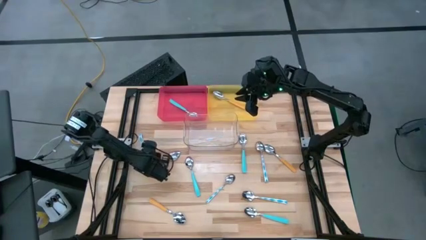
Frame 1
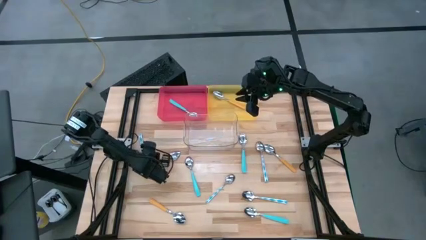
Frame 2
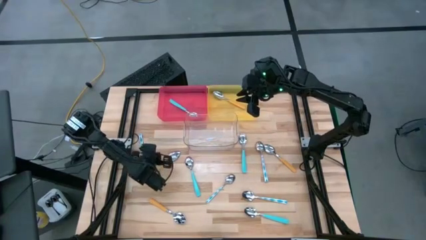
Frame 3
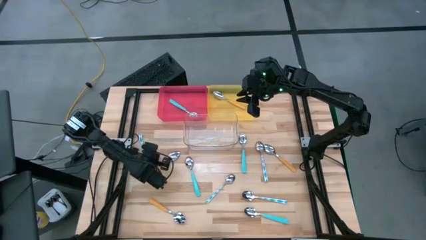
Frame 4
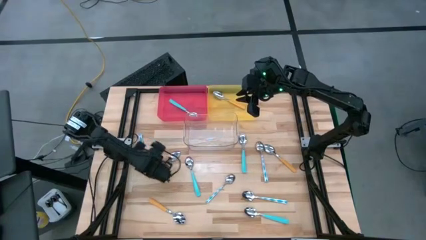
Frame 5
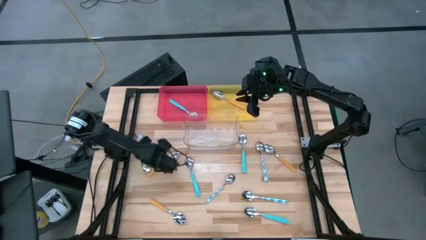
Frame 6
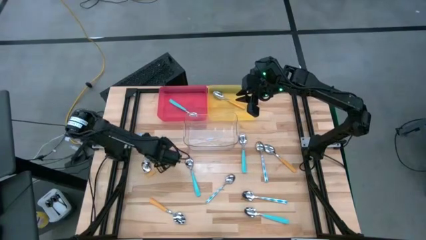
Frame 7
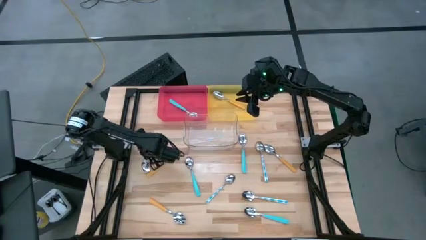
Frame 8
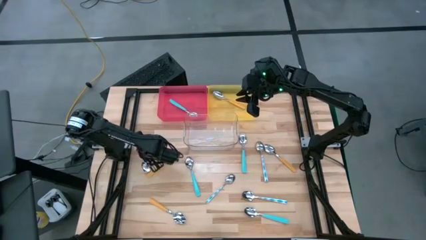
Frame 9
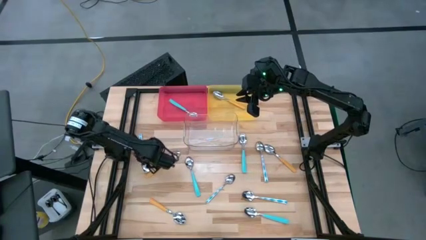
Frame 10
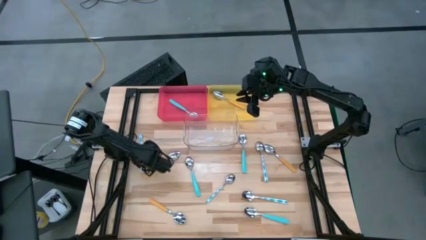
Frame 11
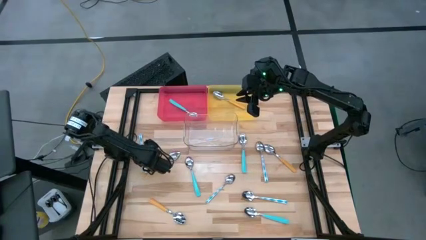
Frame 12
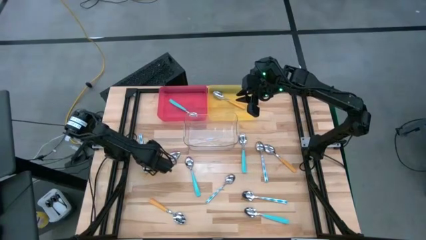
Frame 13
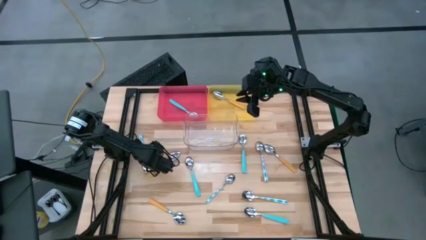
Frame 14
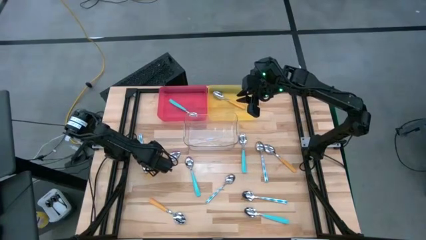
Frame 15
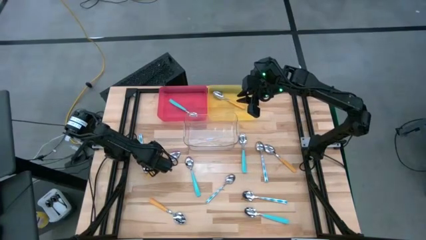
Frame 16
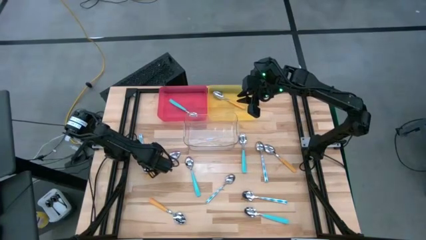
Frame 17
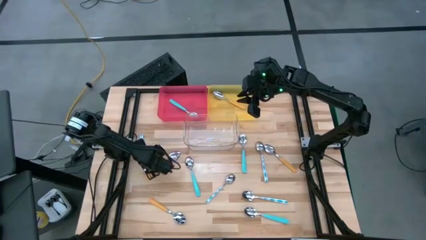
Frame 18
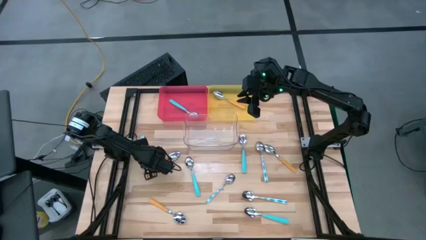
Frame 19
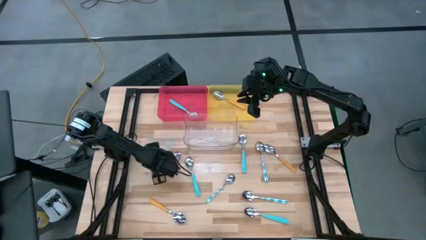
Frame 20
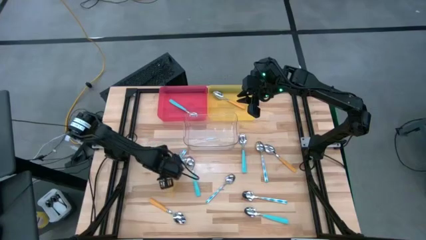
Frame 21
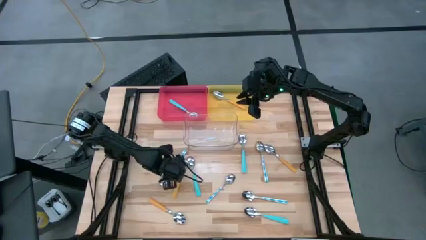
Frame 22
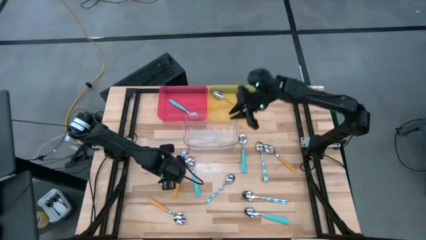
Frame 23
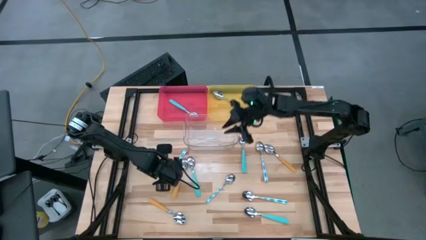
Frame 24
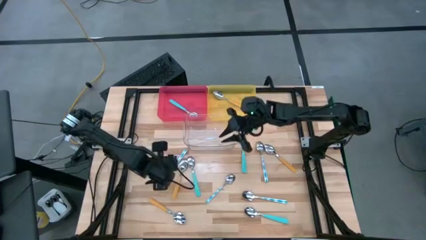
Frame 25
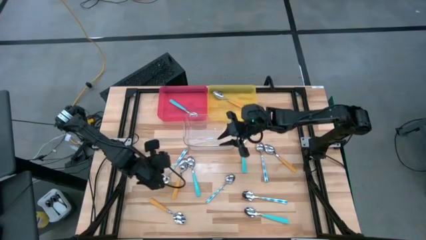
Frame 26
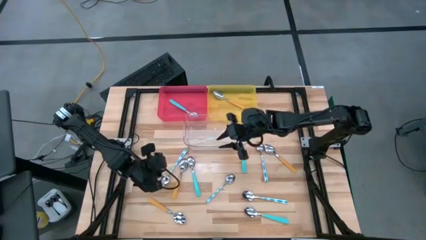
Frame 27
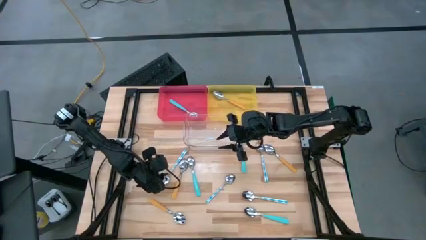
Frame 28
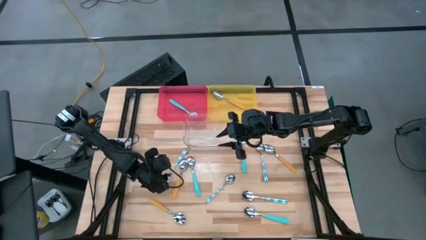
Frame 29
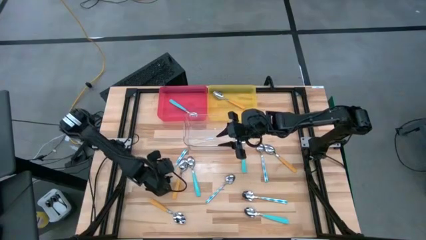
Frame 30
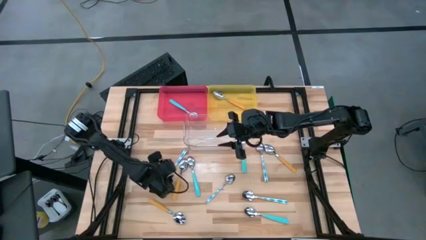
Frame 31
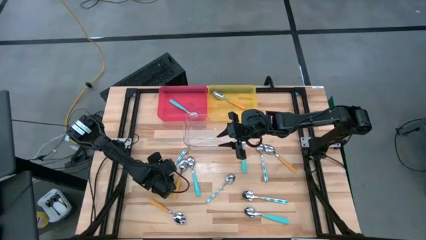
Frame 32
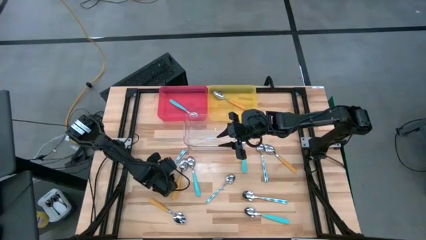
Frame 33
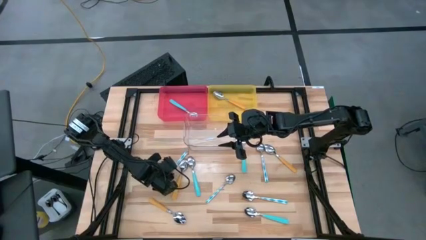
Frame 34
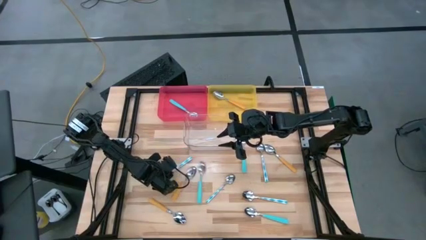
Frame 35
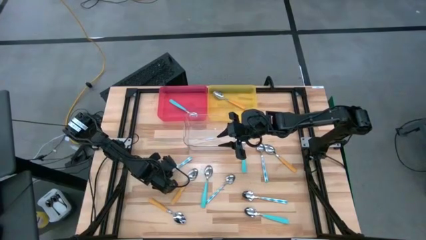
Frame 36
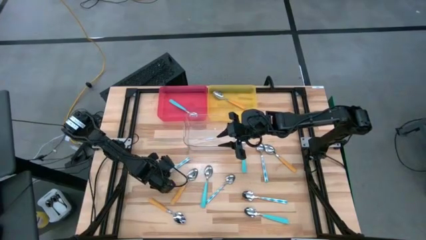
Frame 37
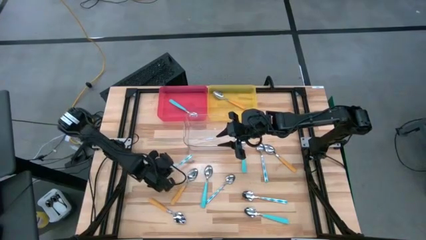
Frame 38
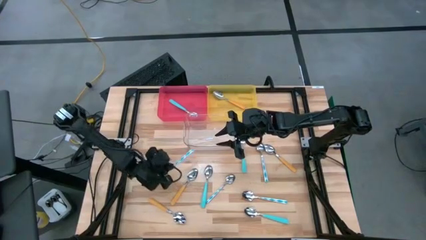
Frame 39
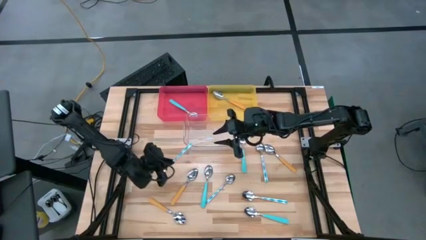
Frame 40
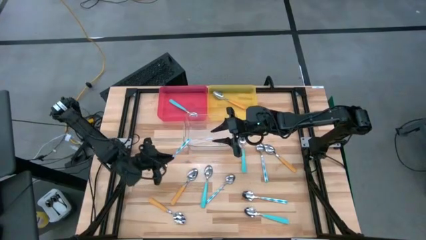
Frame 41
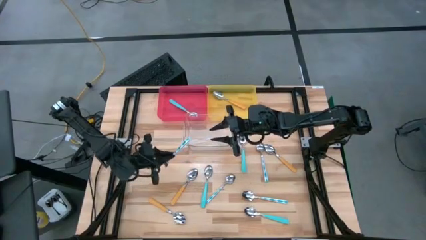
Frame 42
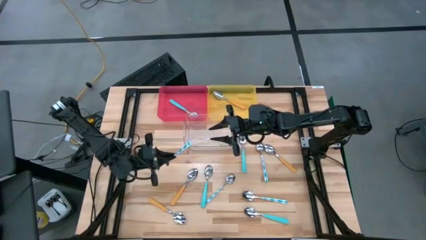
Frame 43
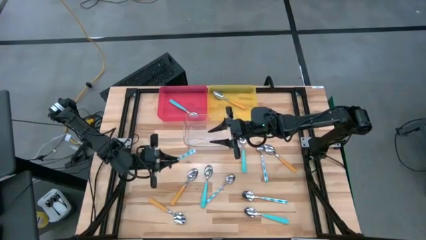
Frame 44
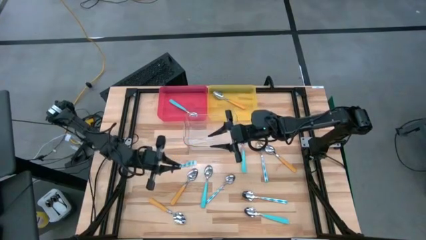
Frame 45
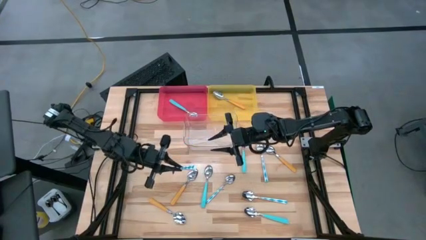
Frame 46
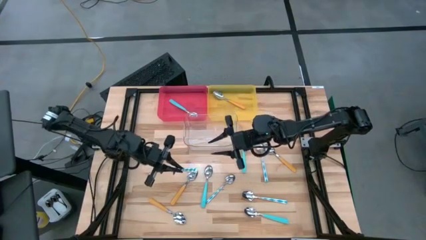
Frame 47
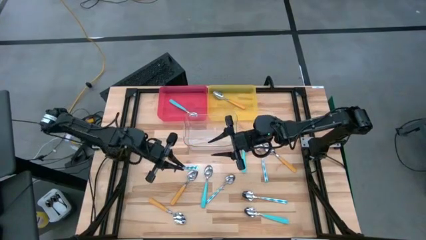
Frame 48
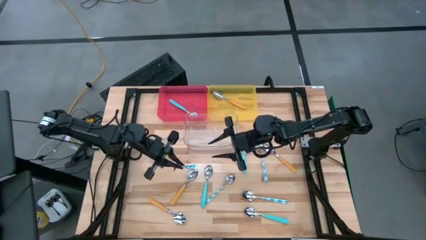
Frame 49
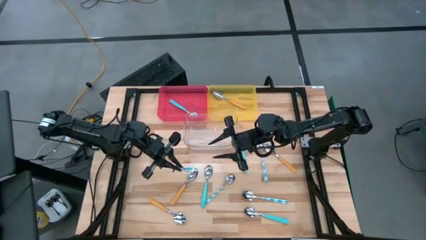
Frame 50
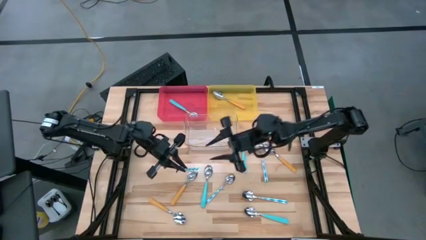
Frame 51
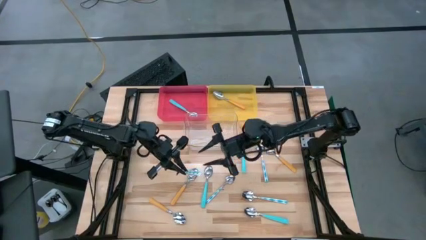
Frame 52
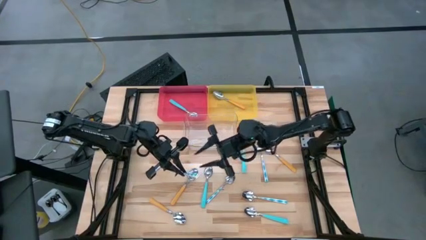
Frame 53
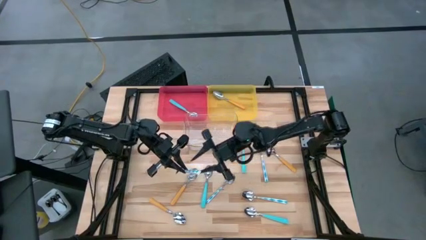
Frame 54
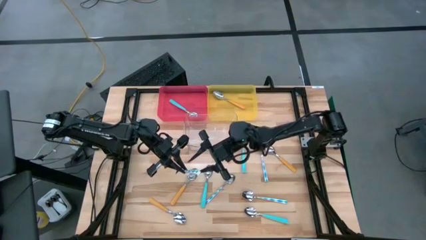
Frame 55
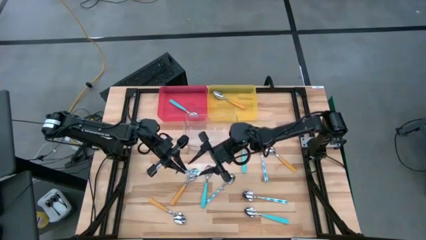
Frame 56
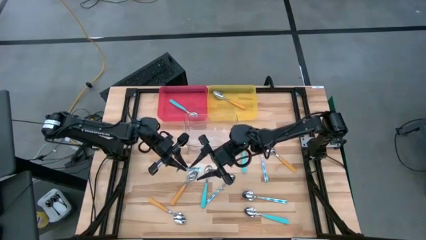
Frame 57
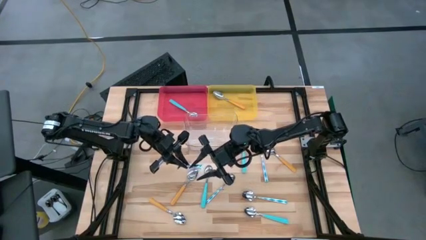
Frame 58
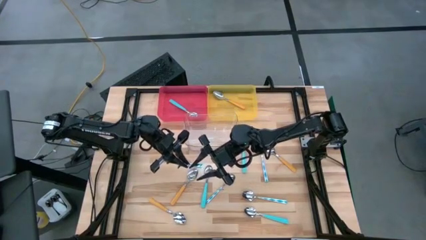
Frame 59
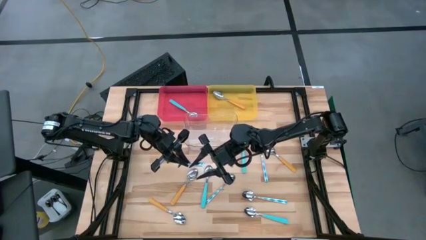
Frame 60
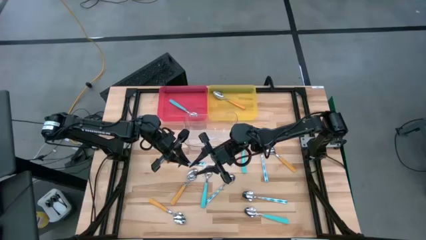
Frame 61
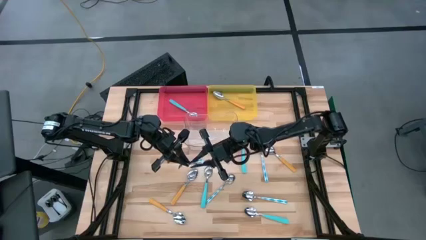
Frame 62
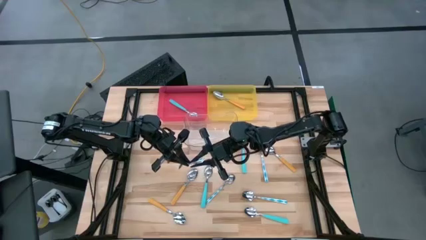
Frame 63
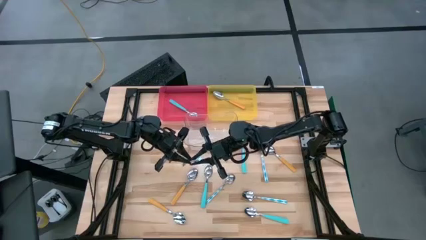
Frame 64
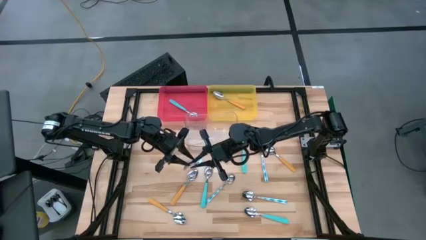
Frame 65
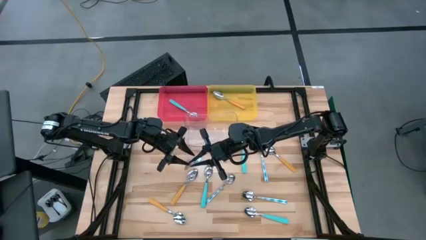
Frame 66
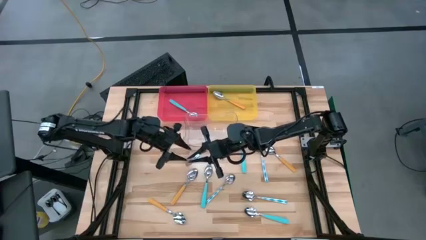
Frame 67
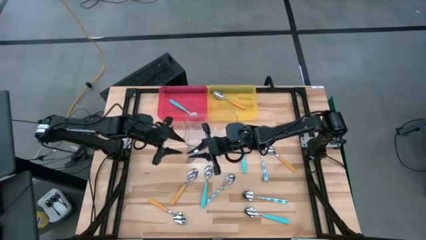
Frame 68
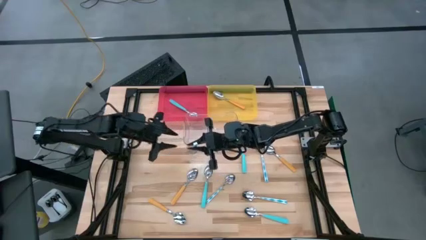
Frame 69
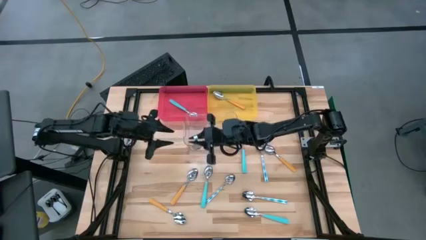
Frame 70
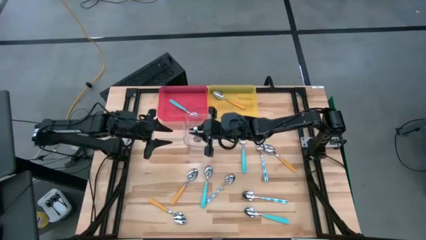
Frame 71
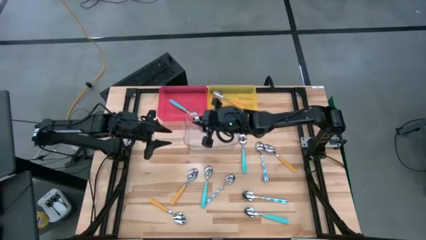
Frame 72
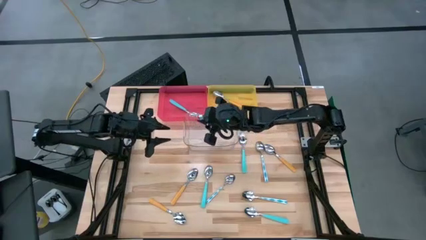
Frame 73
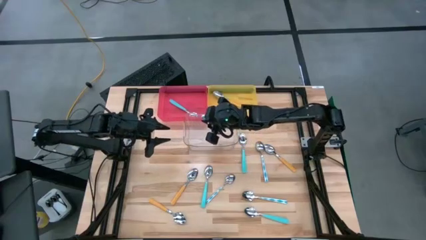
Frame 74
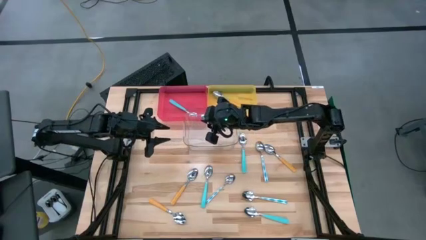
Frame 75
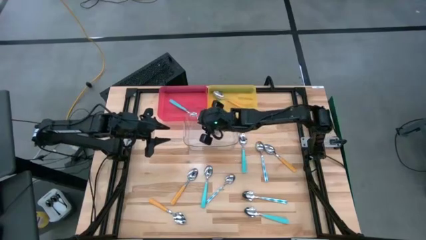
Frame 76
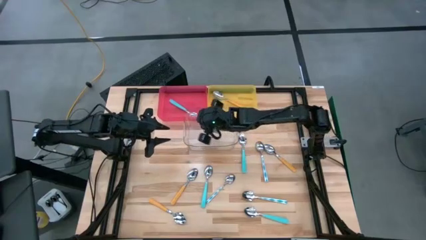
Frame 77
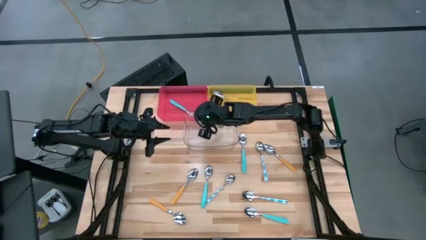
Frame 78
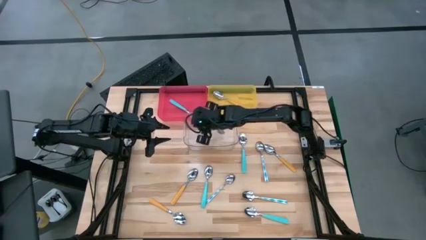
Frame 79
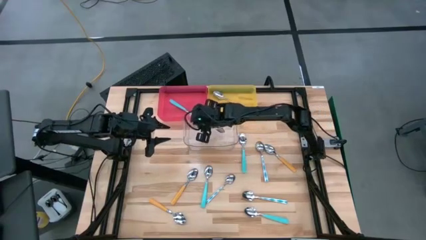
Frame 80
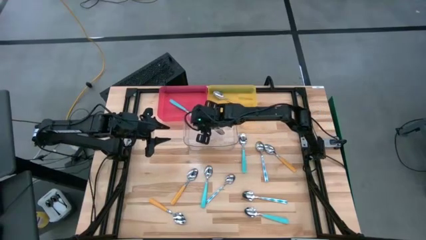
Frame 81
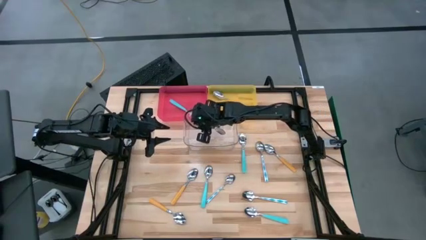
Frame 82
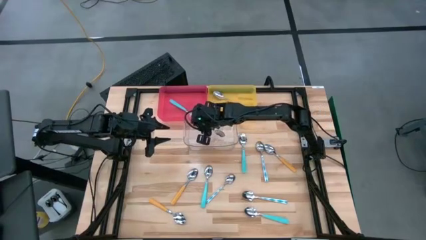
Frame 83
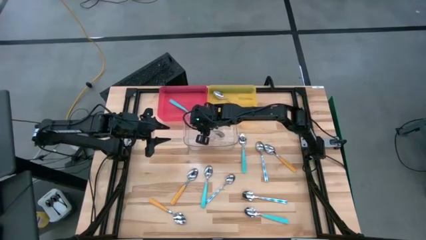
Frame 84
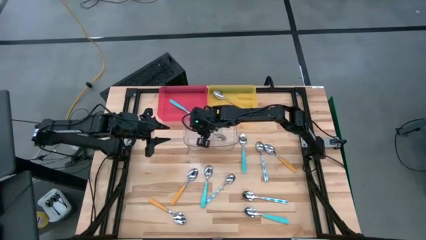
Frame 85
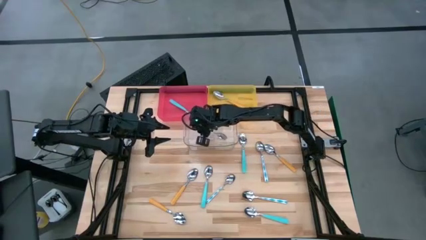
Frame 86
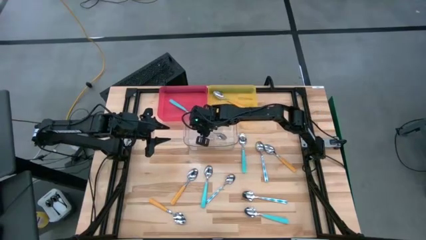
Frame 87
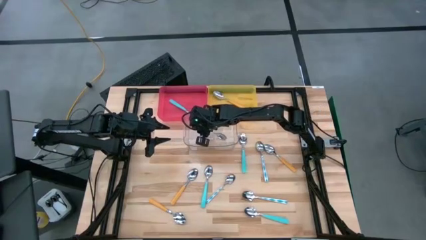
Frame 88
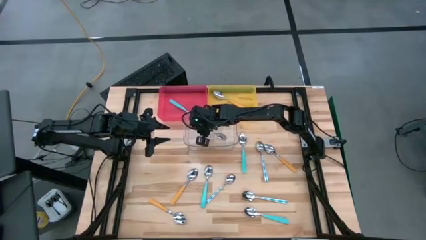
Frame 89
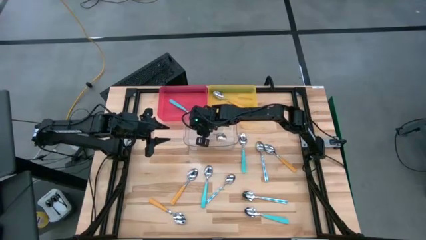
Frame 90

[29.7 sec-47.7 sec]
Task: Sort silverware by color (type)
Put the green patterned spoon into the transparent bin
